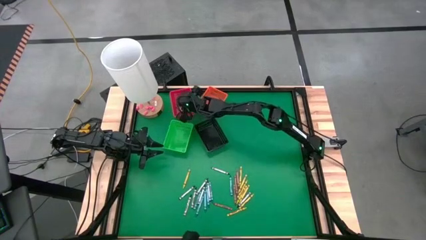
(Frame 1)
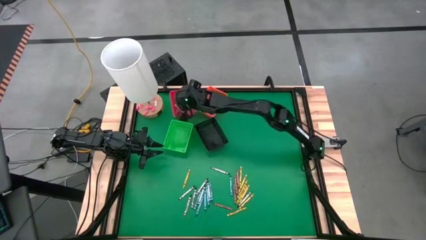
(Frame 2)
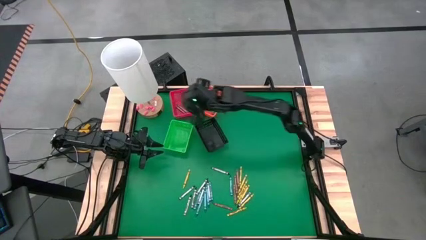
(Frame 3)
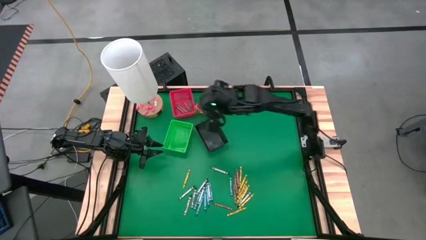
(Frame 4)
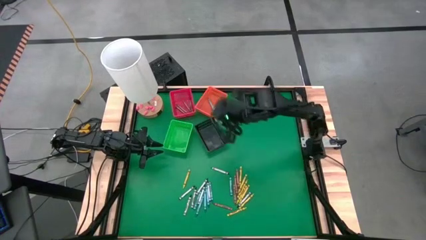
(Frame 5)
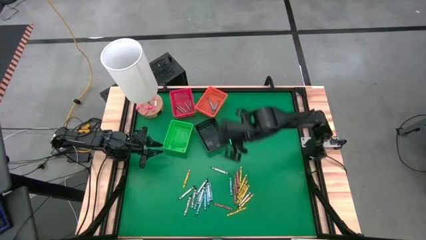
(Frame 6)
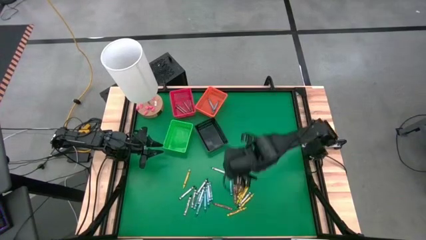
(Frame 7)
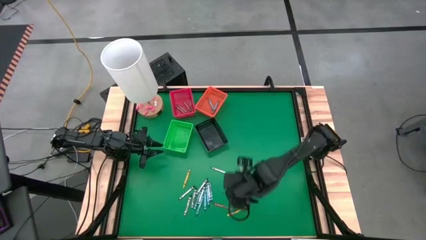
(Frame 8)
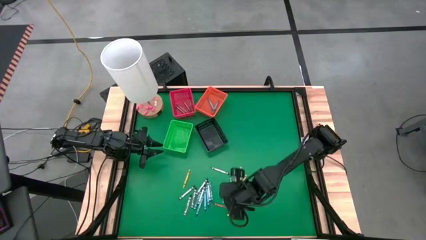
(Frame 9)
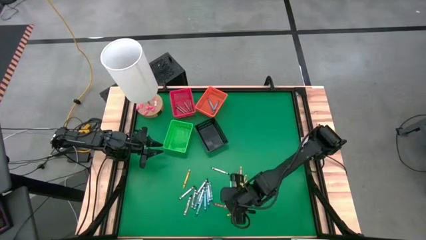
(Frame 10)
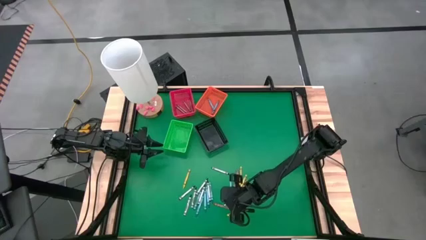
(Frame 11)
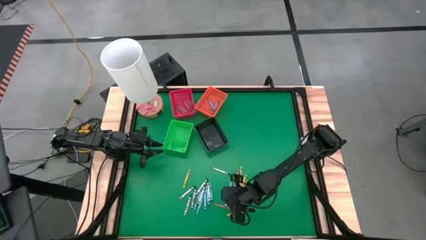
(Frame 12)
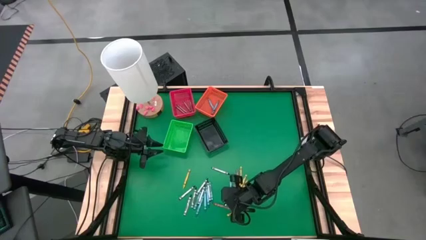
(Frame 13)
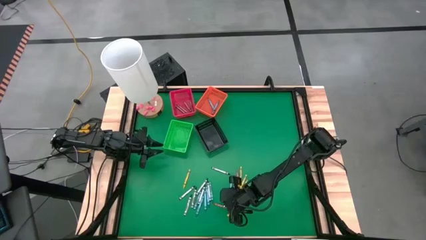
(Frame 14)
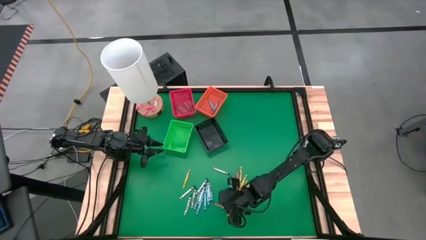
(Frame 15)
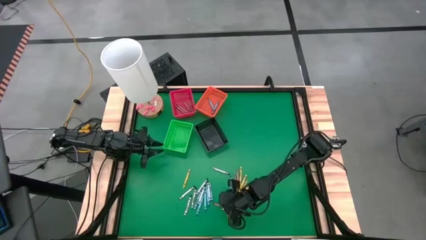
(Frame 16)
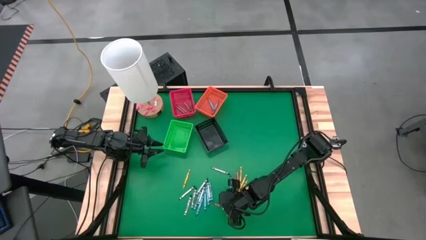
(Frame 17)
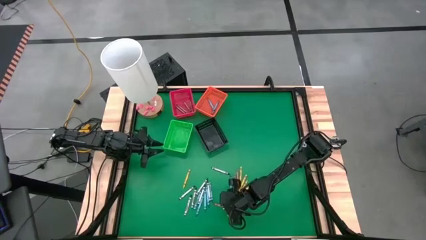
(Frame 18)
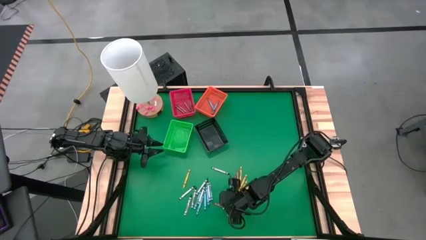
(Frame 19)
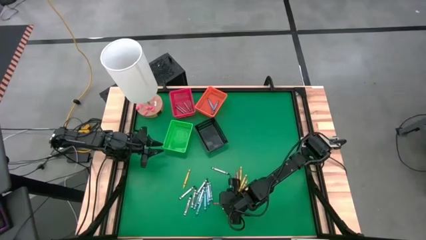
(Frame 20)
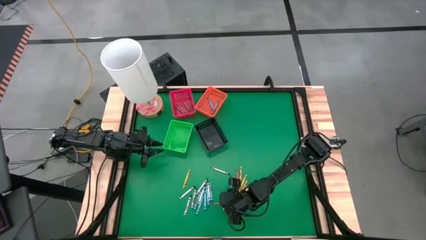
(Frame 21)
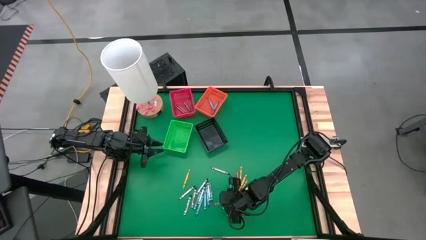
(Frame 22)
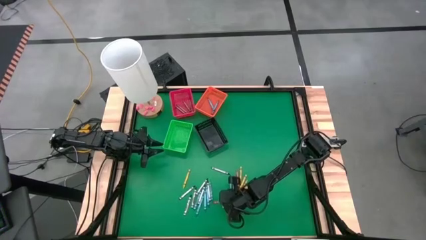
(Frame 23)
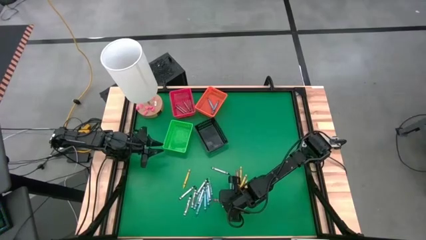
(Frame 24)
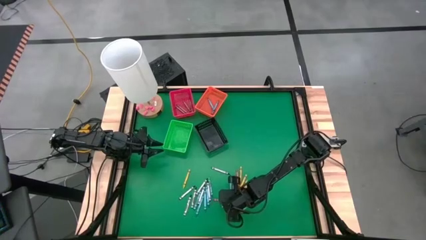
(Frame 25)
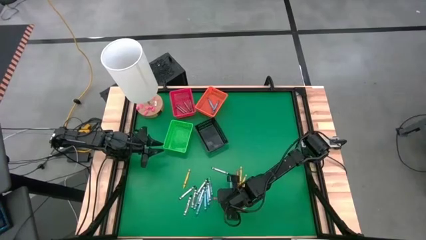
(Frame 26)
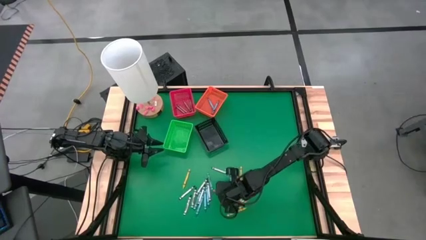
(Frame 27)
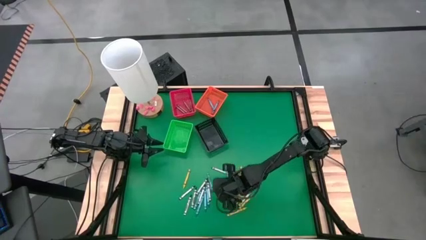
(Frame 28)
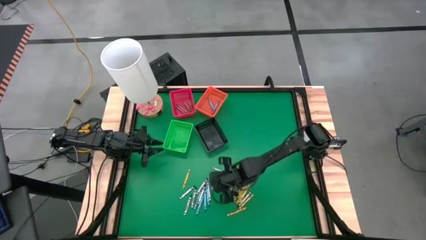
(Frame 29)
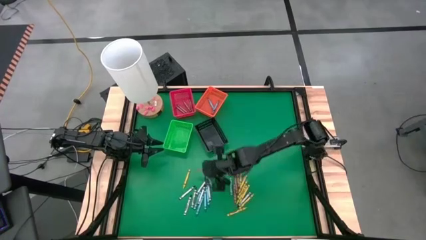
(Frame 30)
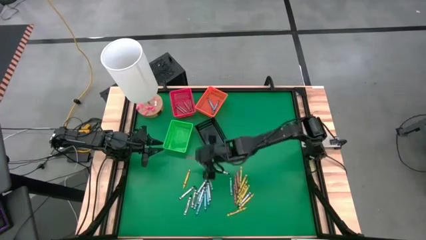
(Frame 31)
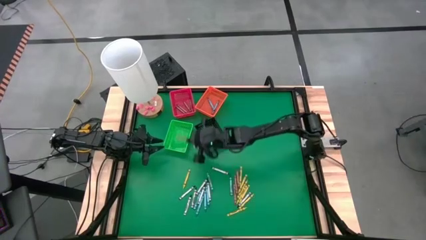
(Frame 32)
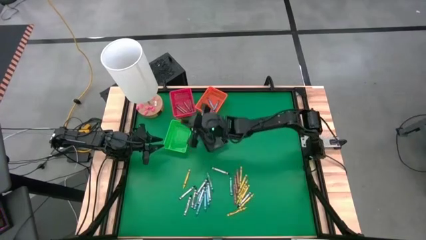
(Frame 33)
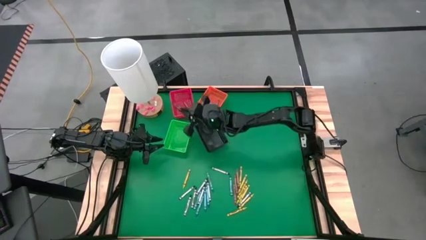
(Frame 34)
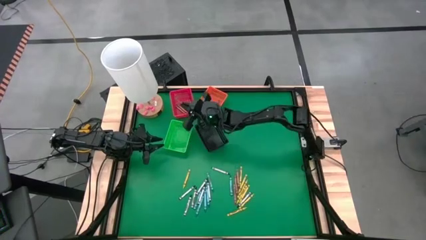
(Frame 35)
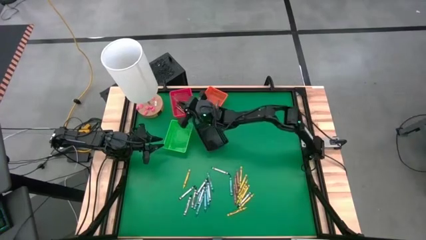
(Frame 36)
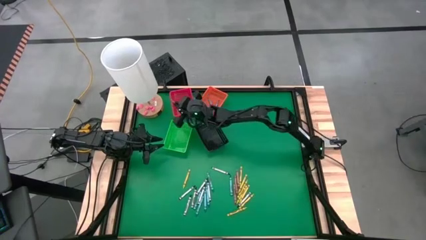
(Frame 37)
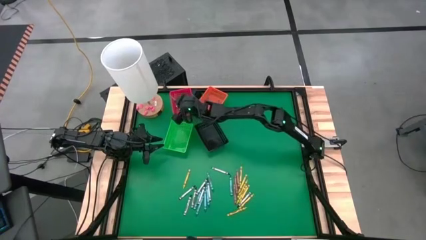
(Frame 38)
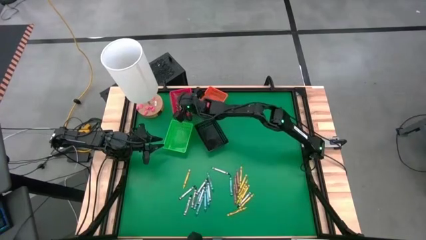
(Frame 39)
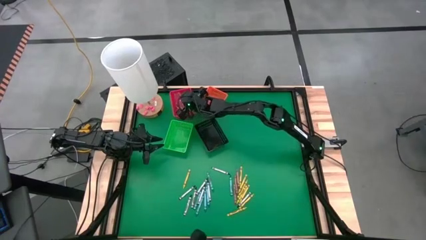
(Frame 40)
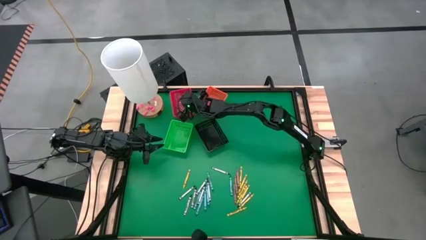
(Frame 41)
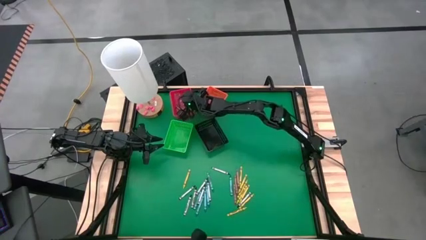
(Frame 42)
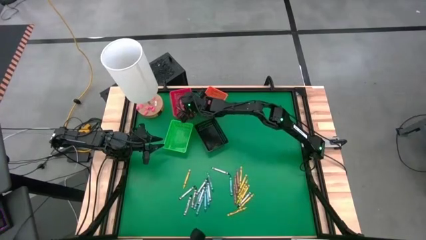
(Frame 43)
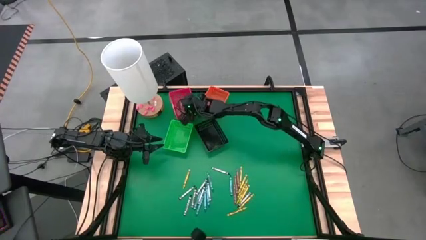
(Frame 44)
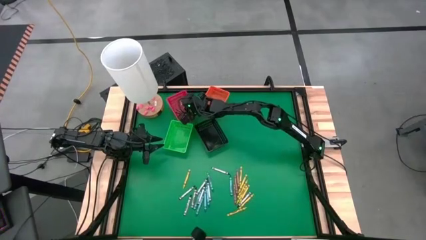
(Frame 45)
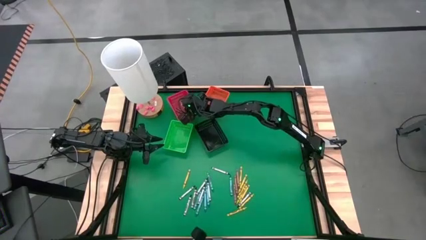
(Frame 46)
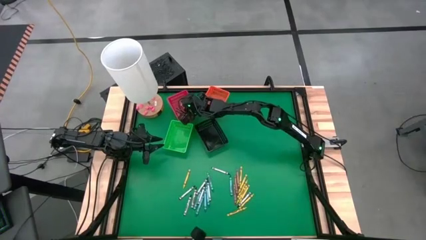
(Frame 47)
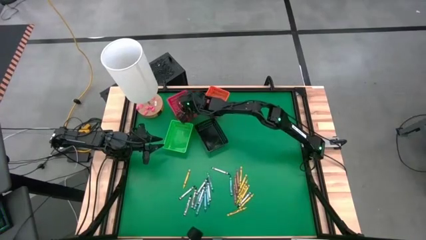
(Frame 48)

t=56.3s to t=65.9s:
Task: Sort crayons
Put the brown crayon into the red bin
